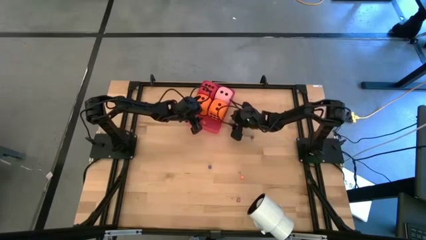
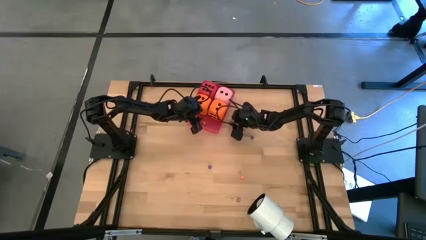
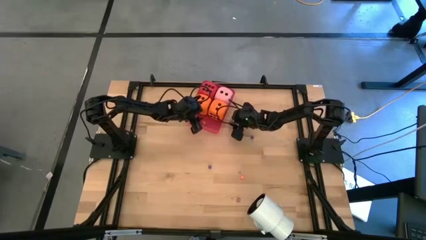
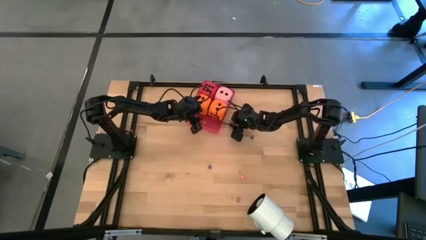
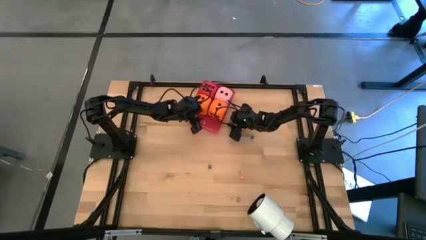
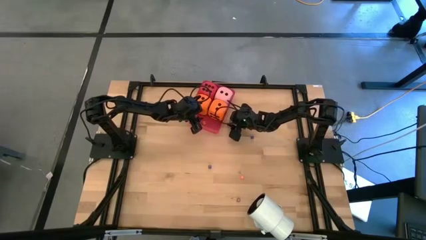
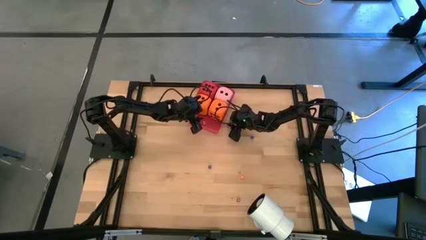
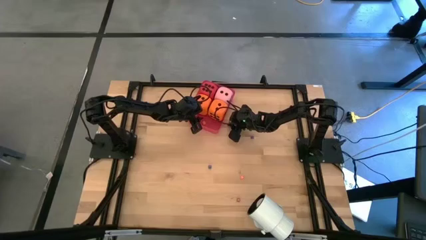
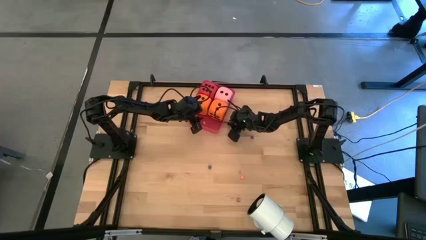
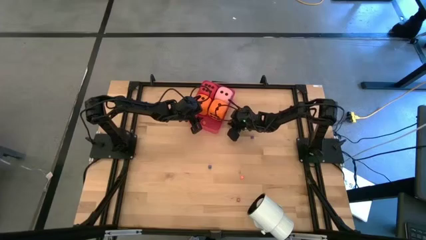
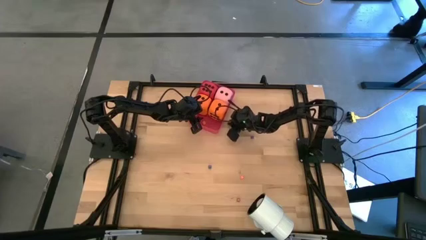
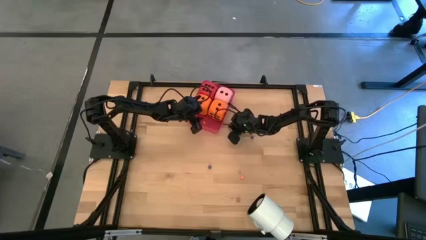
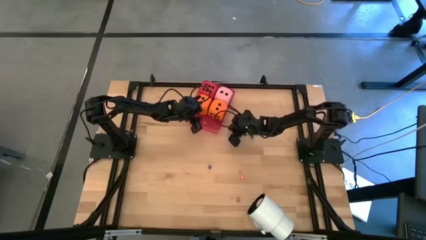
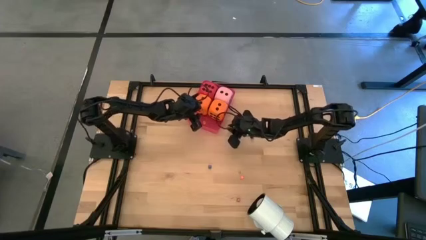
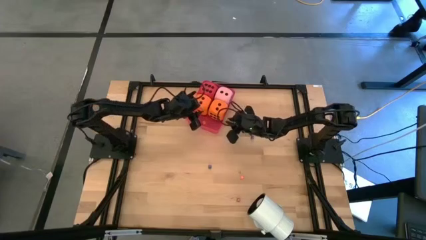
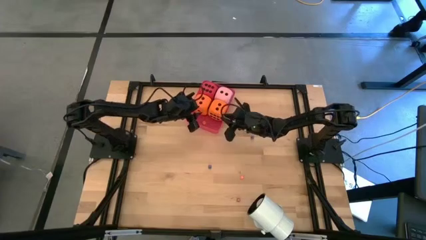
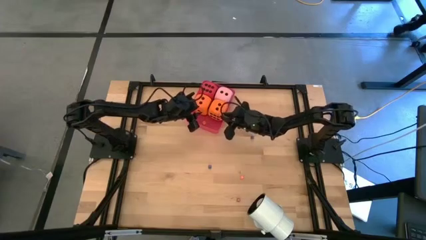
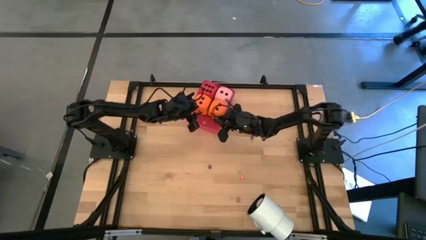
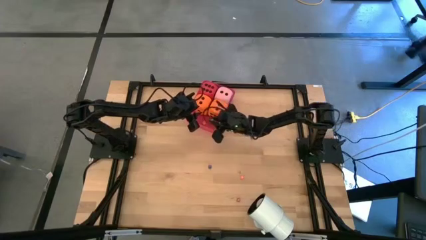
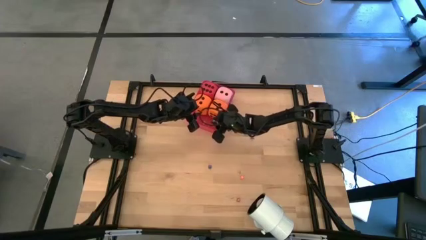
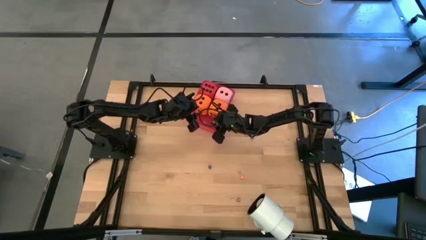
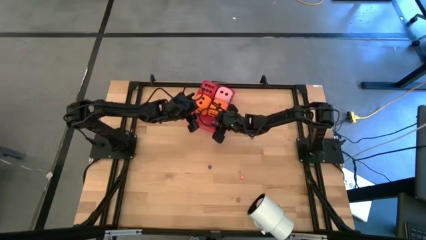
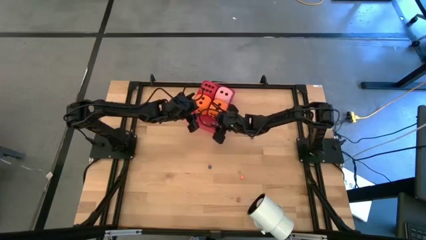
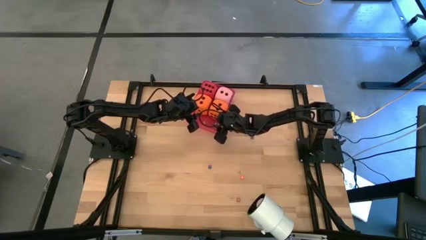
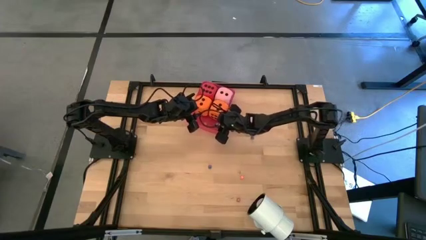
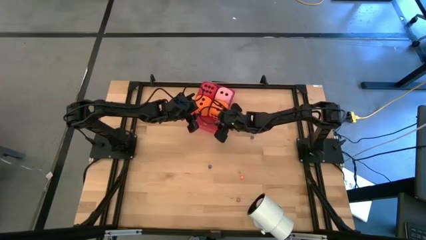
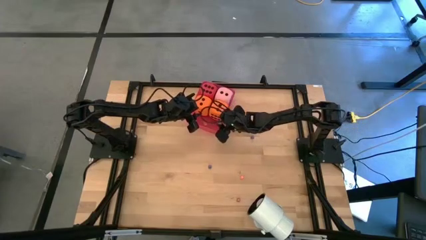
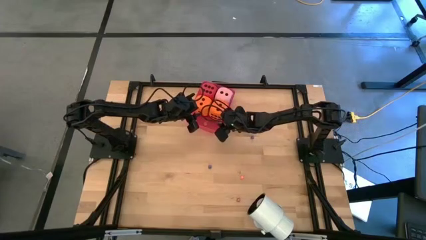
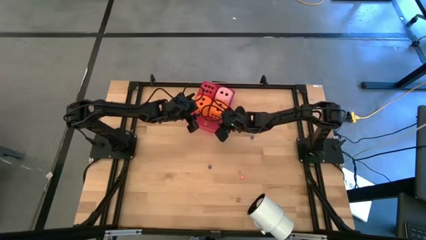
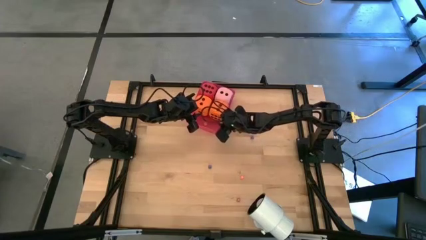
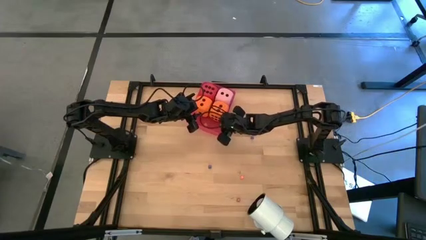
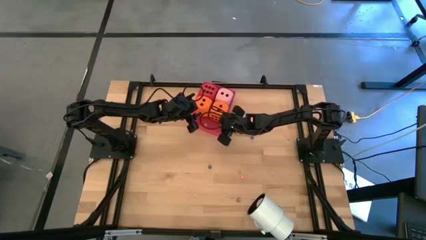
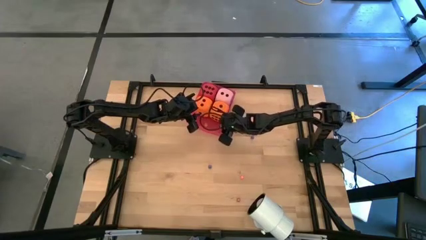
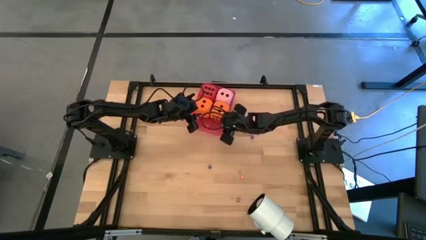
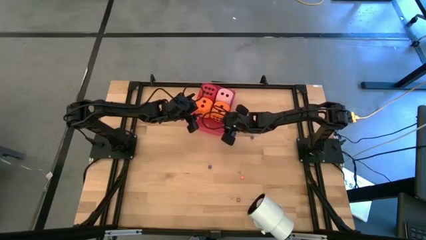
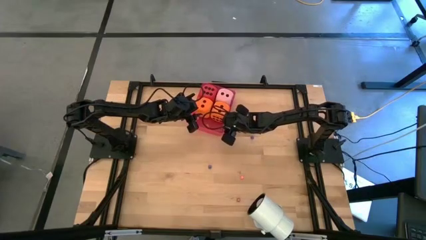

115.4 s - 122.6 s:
Task: Pick & Place Dice
Put the small green dice into the red bin

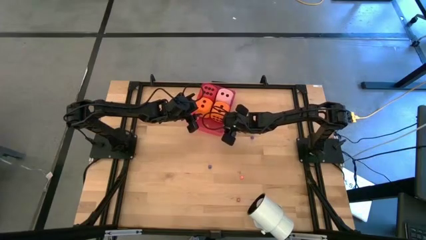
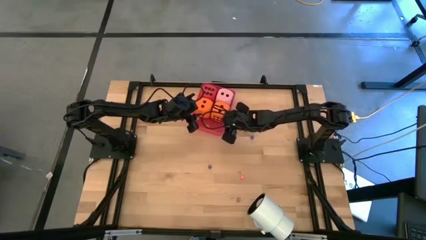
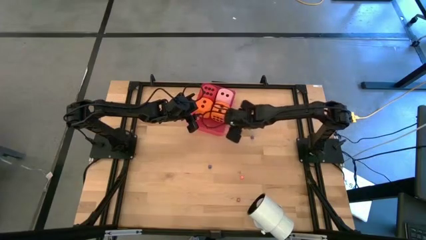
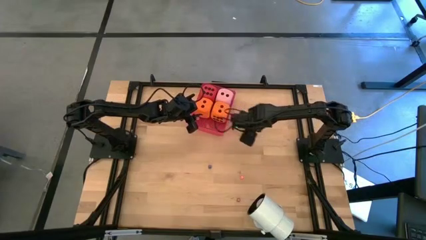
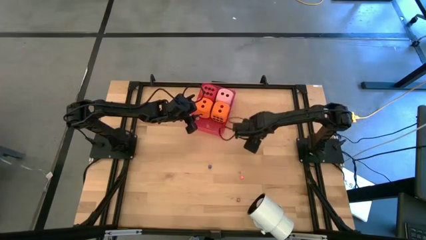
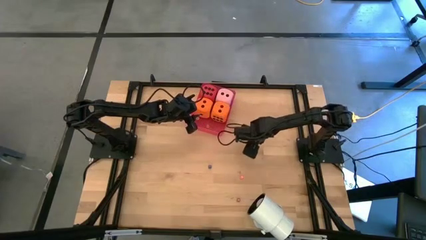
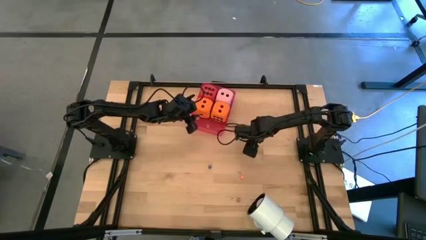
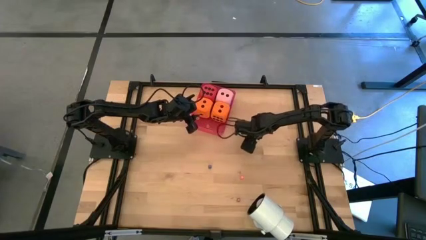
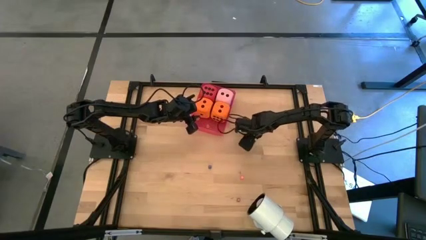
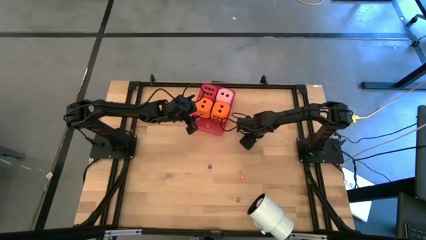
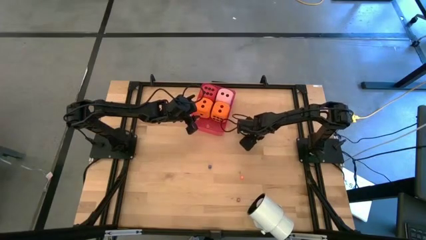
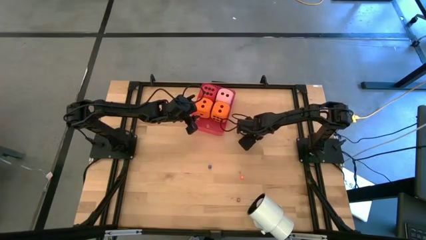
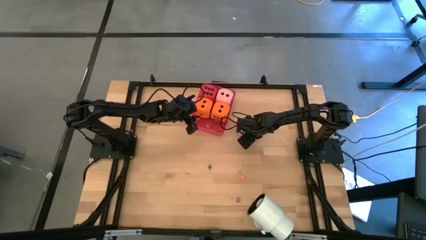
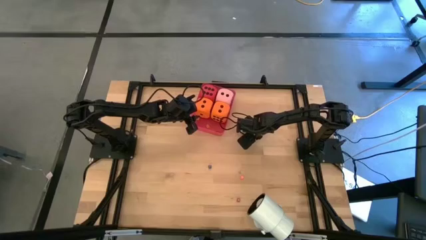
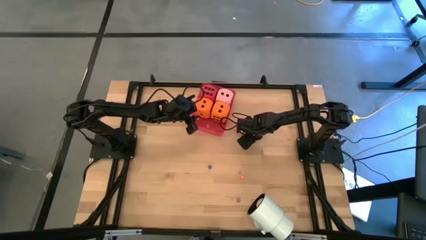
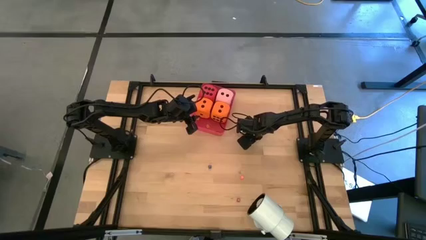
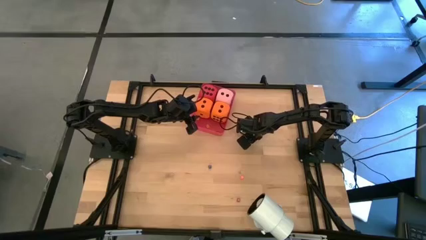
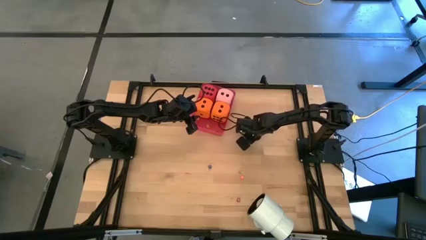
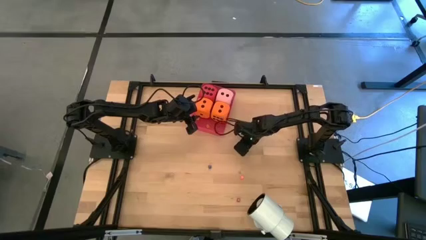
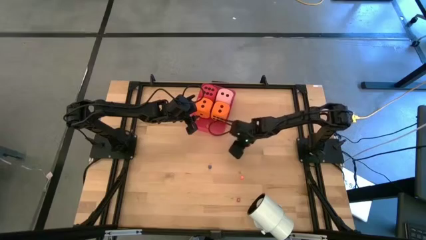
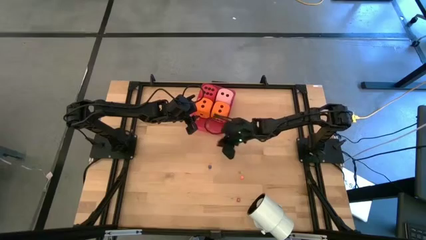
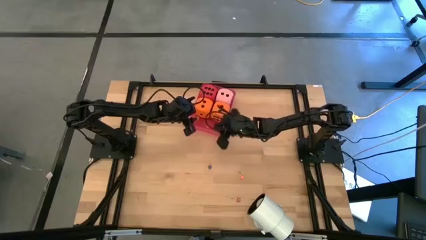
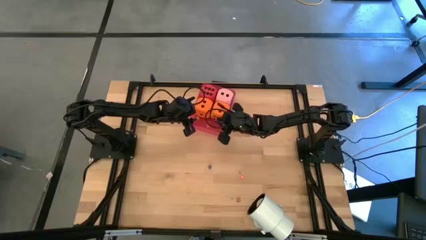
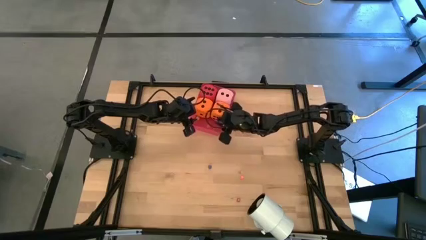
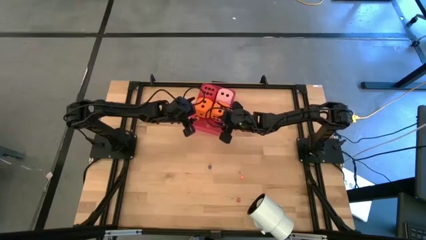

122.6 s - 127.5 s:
Put the small blue dice into the red bin

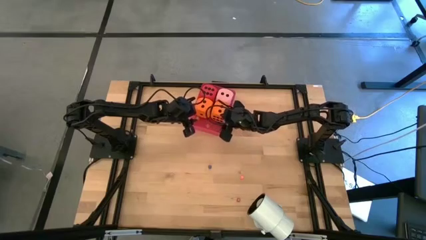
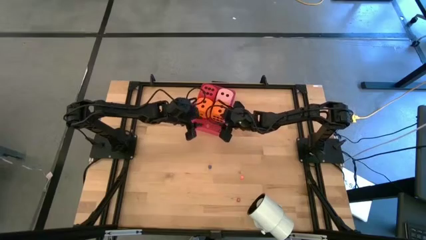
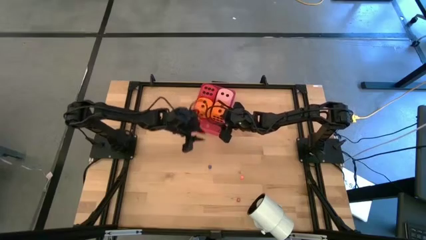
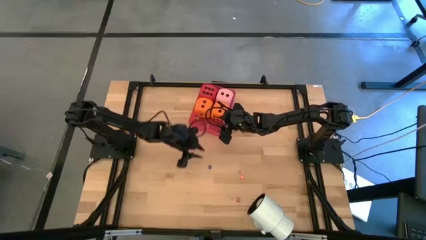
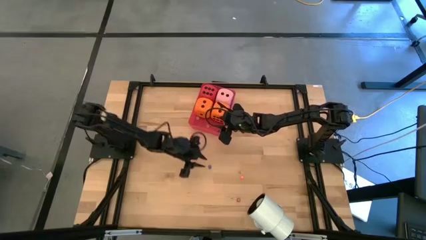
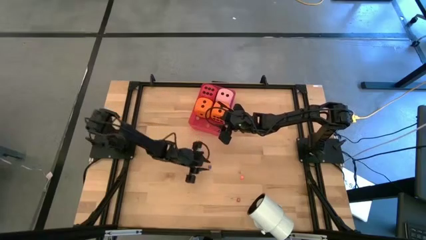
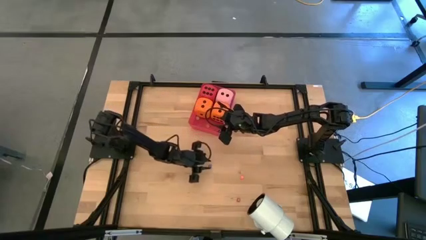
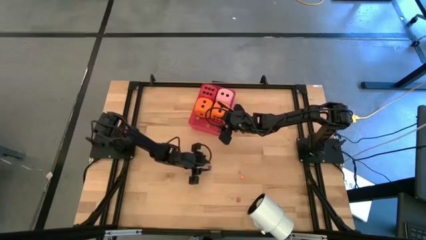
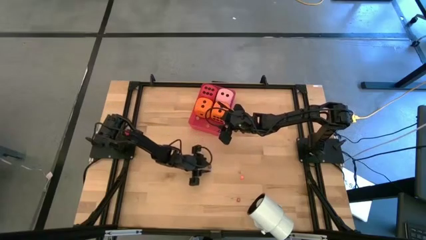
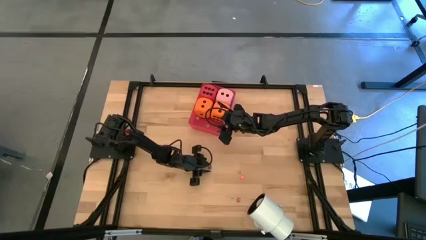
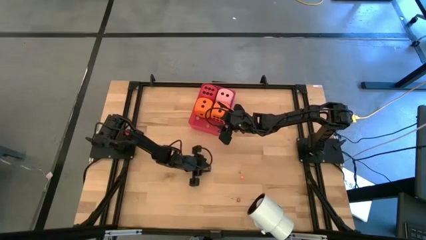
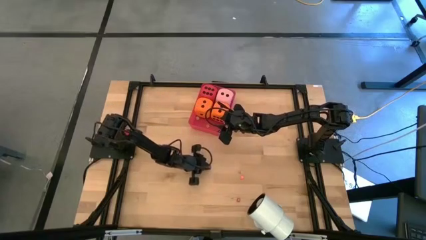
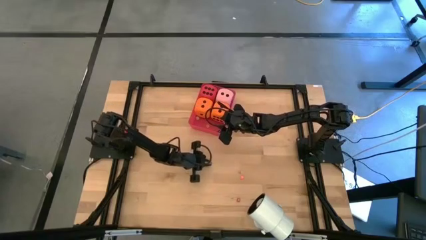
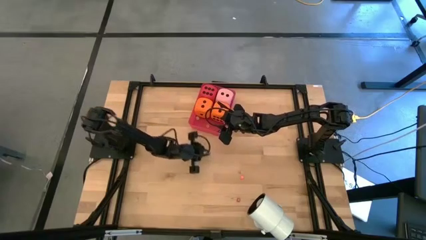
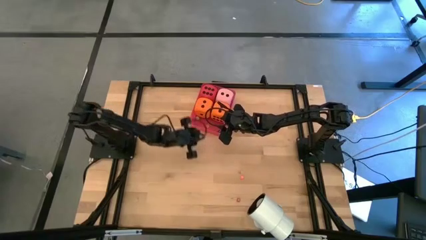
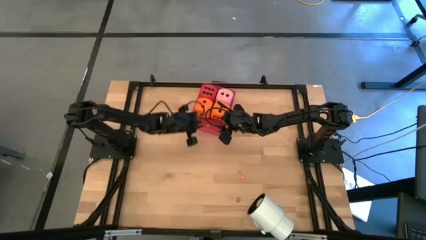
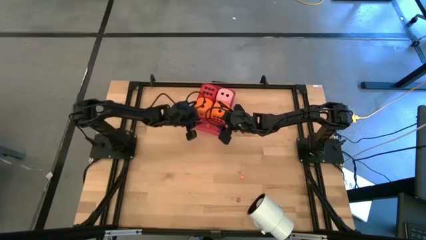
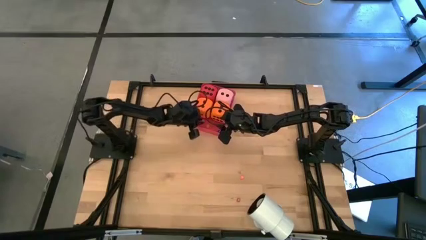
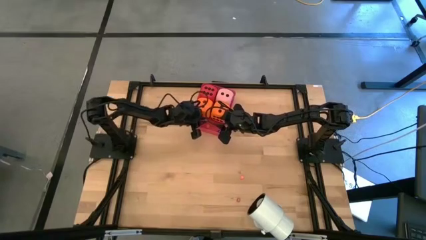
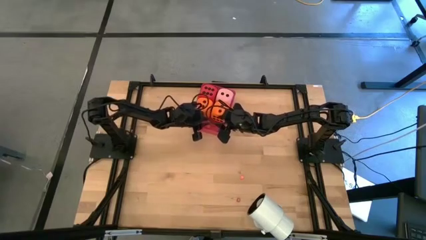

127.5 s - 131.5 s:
Put the top right small blue dice into the red bin
